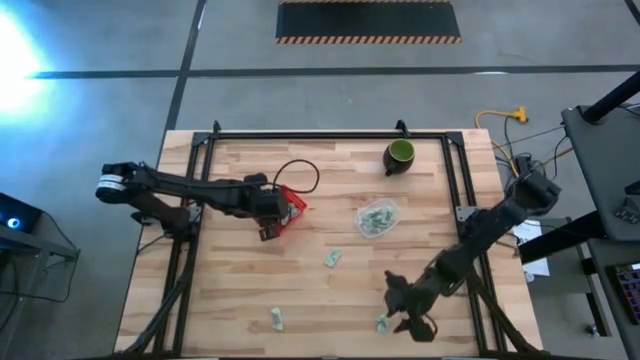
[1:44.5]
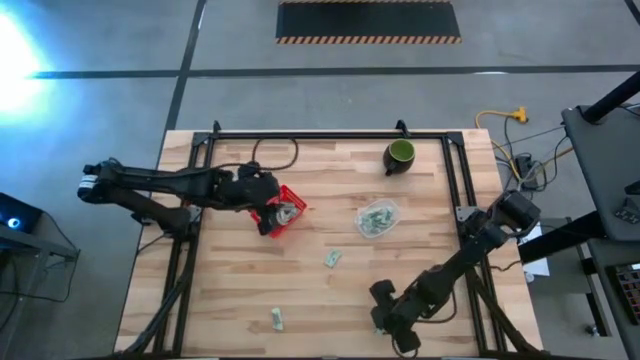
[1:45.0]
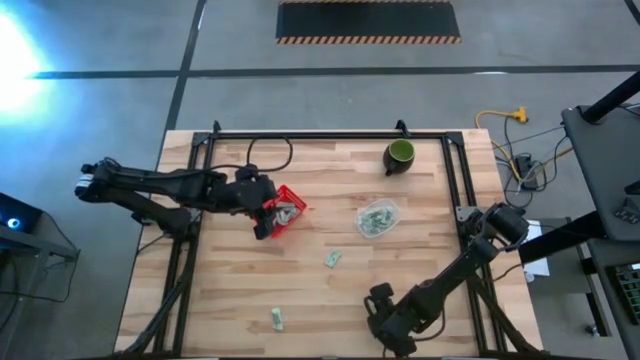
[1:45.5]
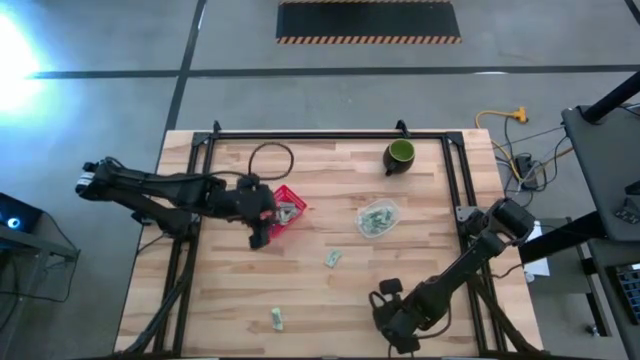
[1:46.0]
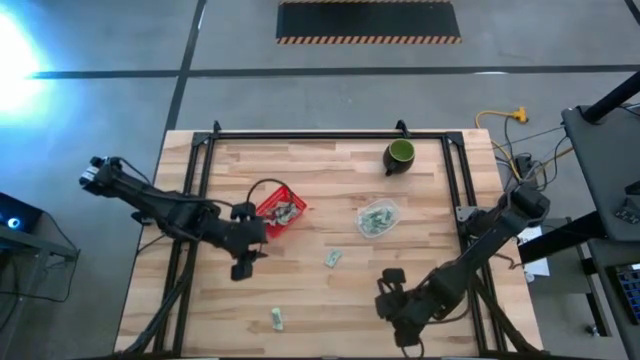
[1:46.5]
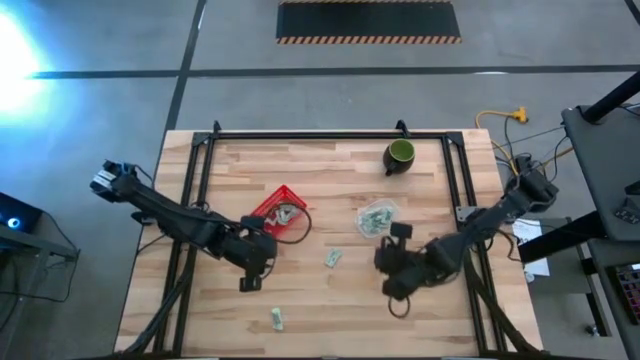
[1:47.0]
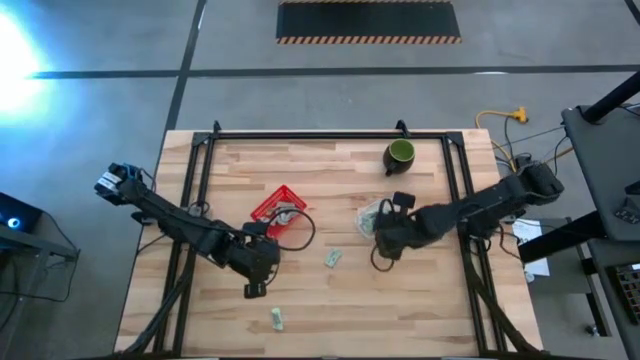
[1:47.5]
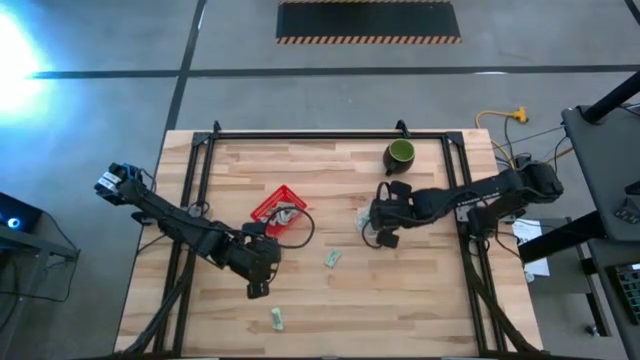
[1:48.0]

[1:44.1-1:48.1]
Task: Pick and place items into bin
Put the stevia packet into the transparent bin

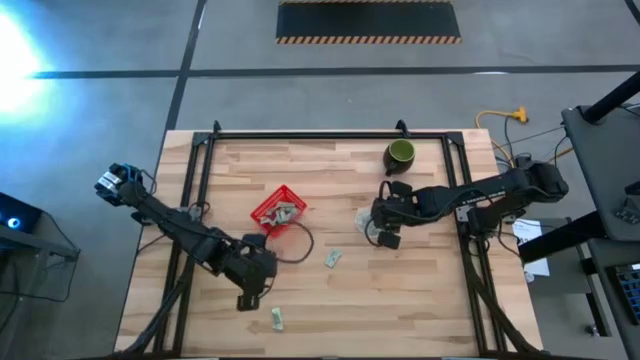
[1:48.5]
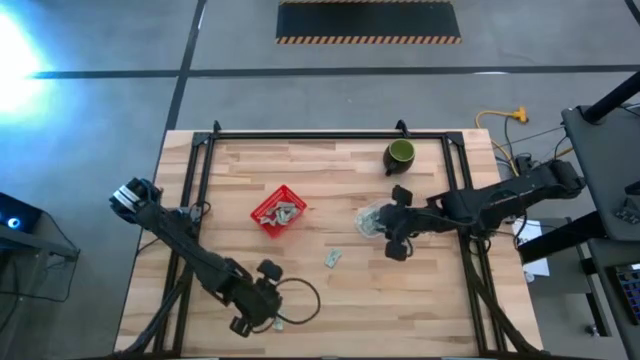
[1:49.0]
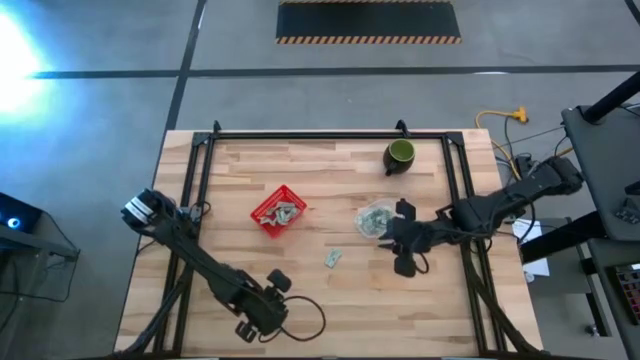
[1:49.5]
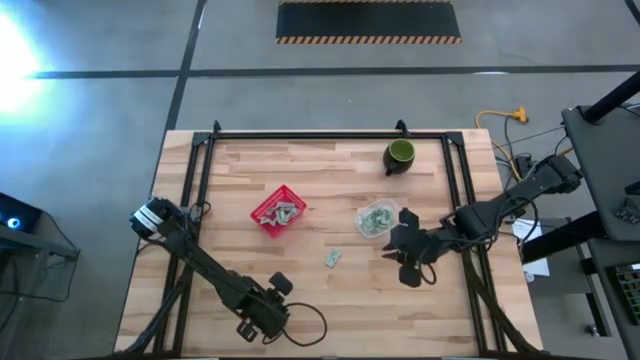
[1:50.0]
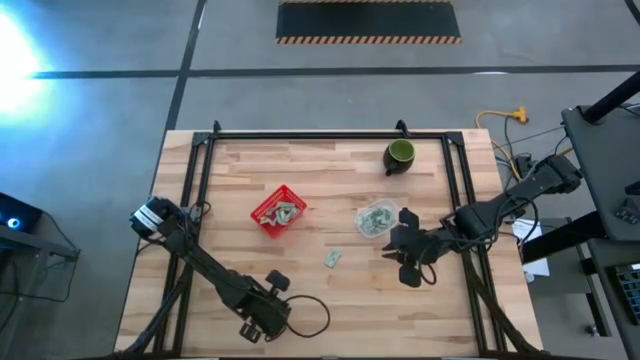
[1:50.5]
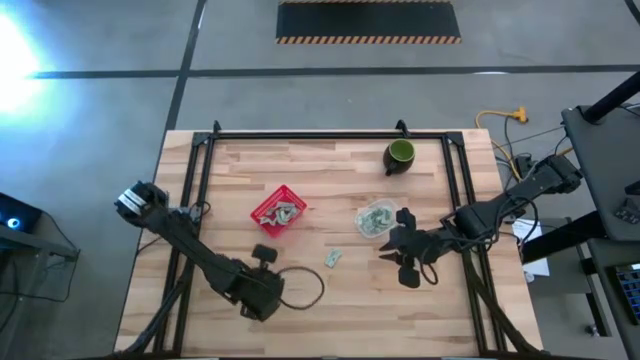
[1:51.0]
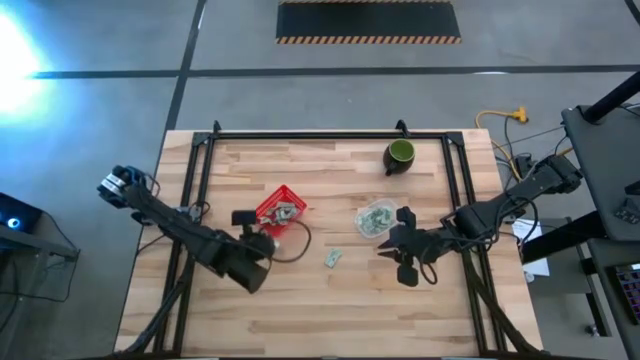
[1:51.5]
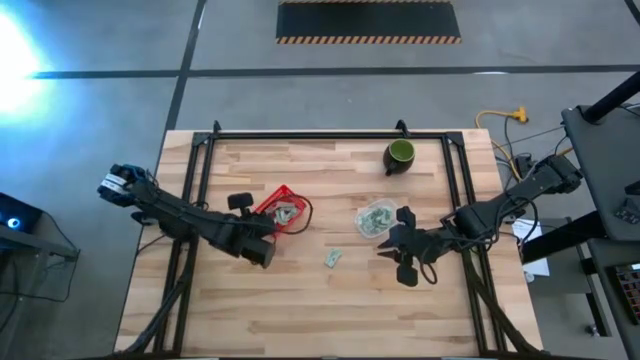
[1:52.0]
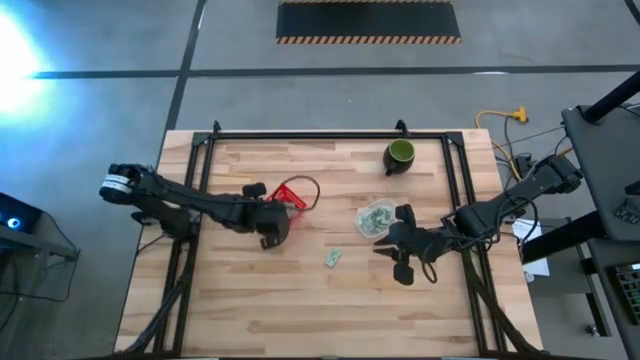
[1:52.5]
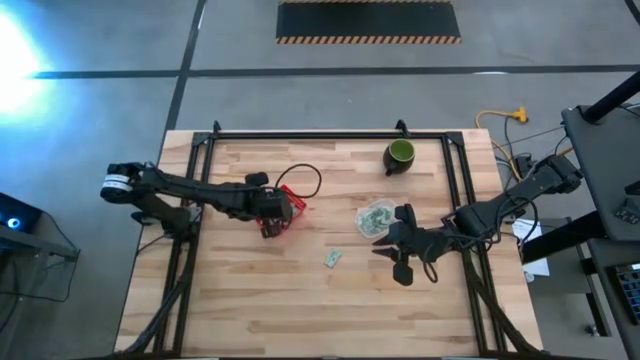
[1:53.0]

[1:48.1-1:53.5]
Put the stevia packet into the red bin

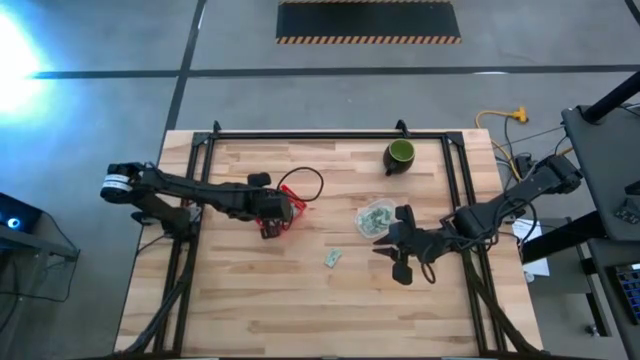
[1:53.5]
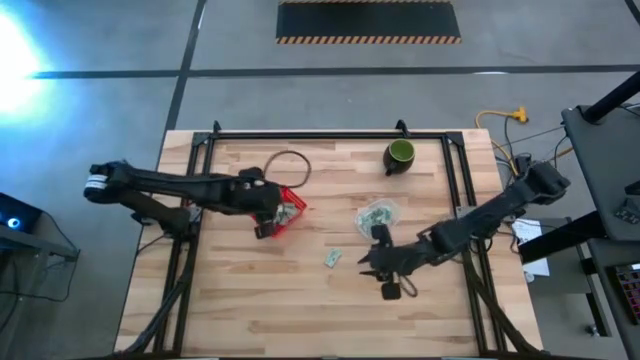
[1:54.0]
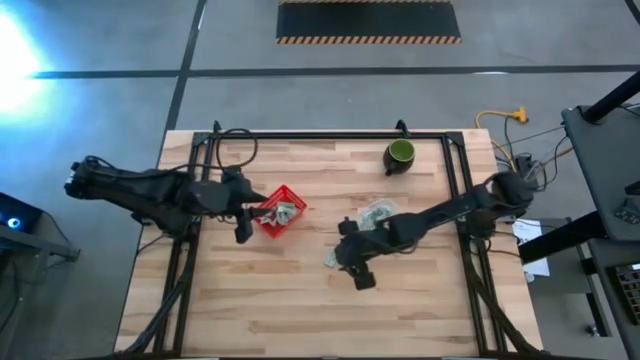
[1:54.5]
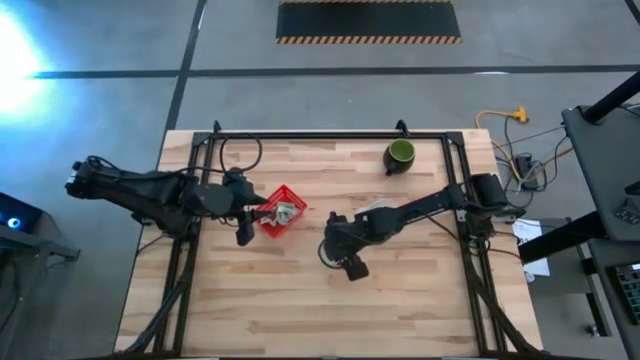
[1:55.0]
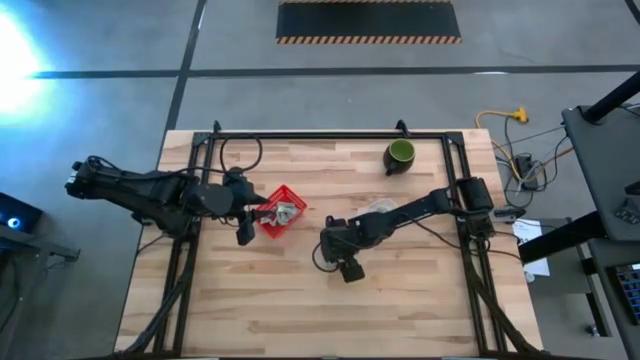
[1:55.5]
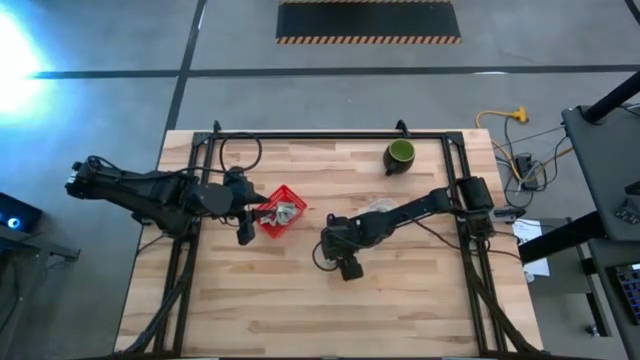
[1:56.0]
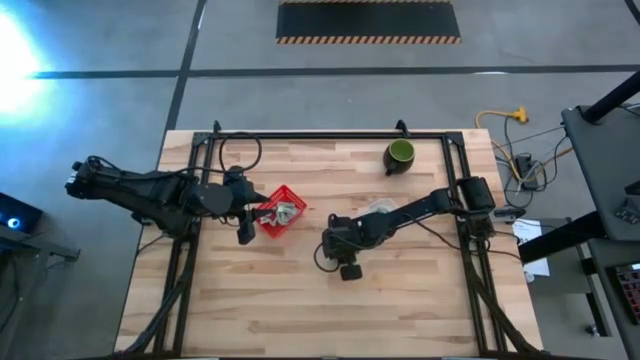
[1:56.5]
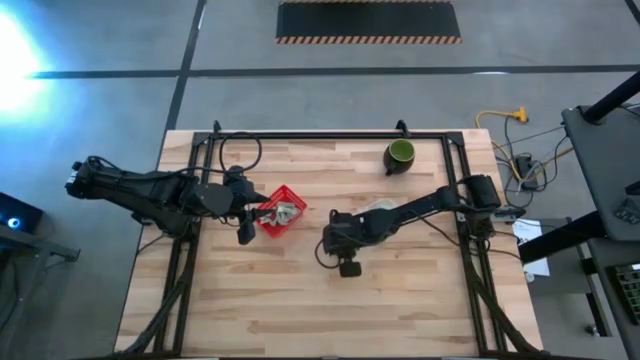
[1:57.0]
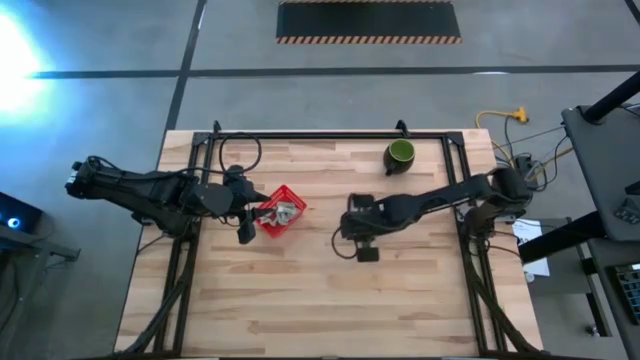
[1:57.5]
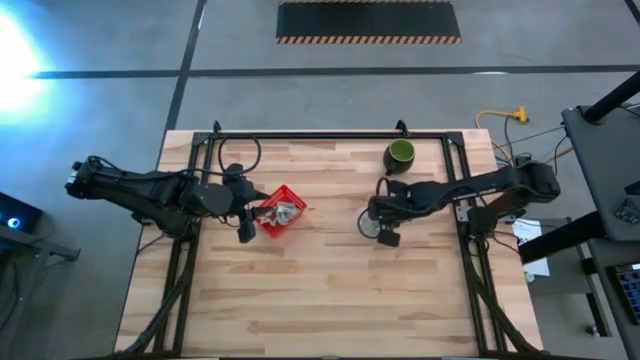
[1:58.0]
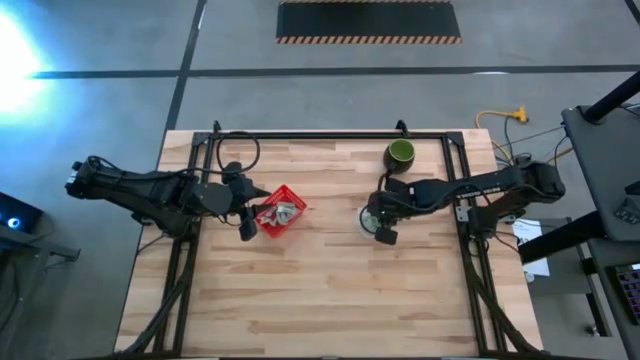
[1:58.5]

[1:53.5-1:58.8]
Put the stevia packet into the transparent bin

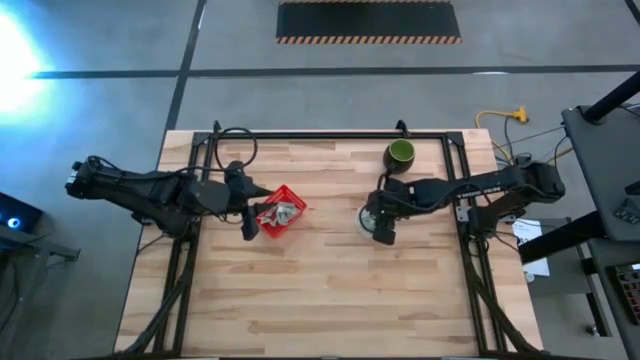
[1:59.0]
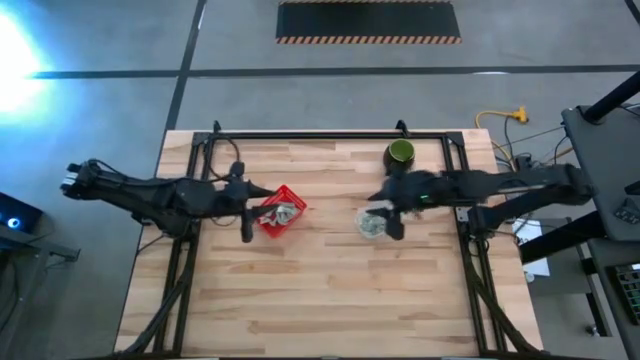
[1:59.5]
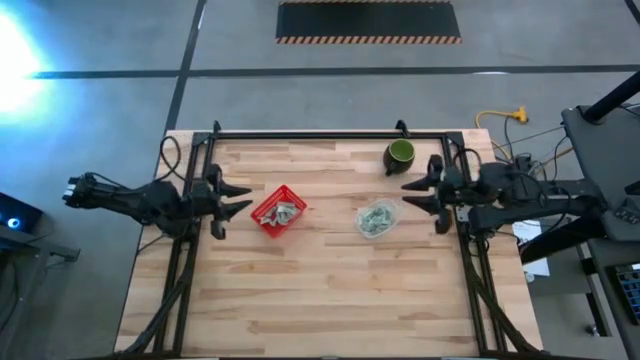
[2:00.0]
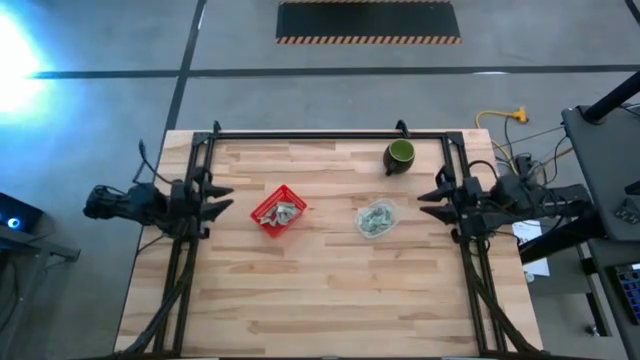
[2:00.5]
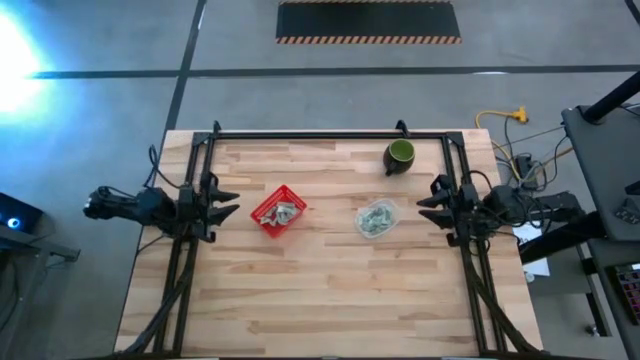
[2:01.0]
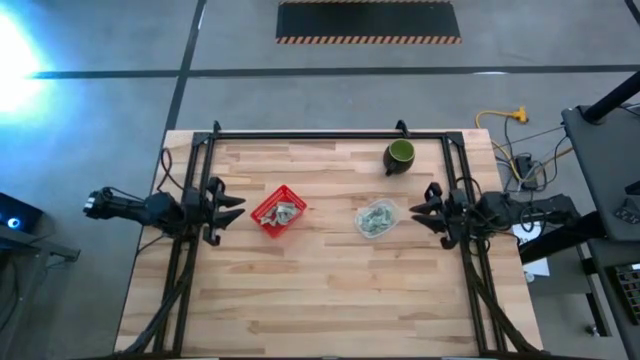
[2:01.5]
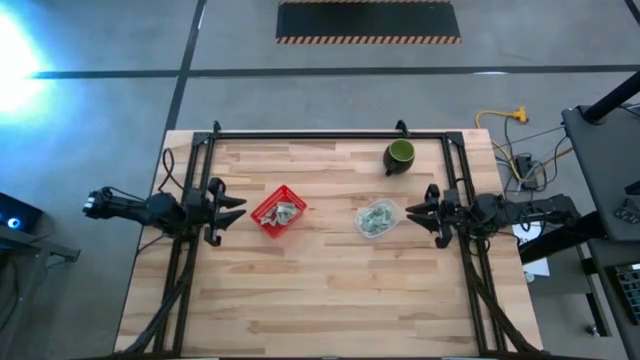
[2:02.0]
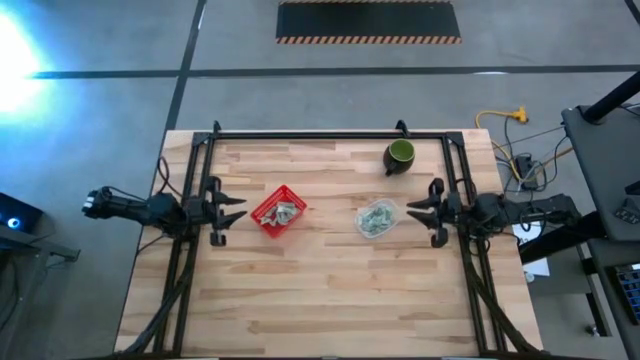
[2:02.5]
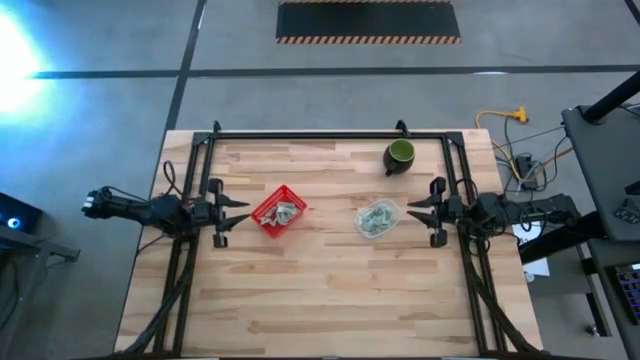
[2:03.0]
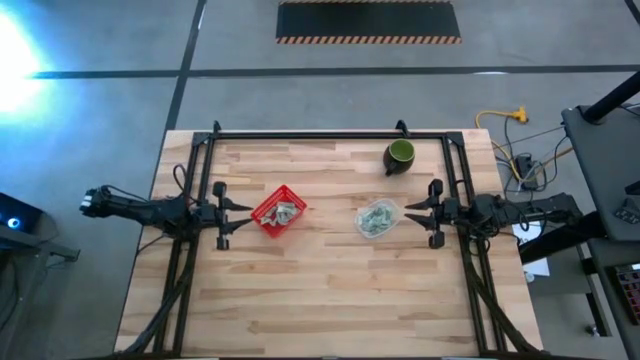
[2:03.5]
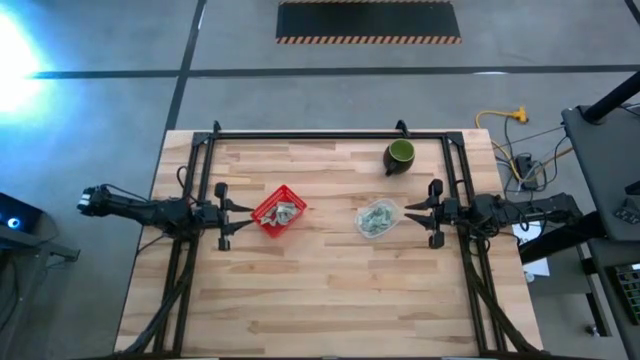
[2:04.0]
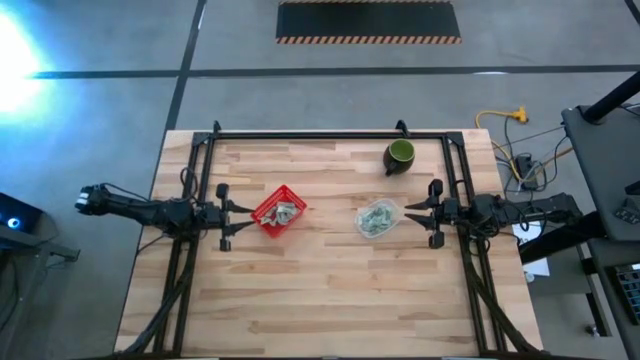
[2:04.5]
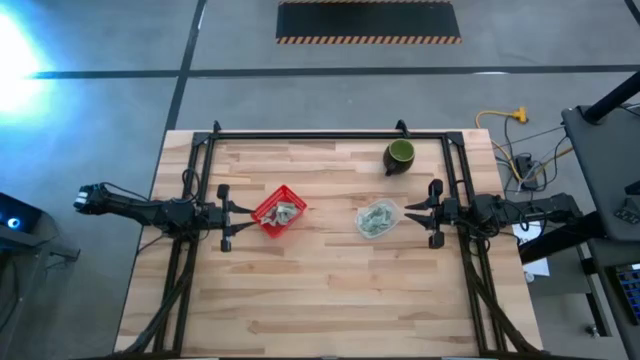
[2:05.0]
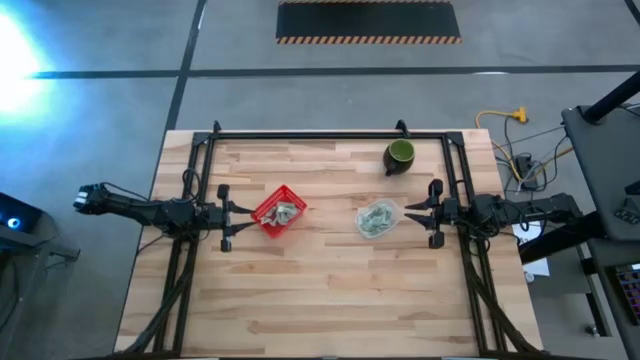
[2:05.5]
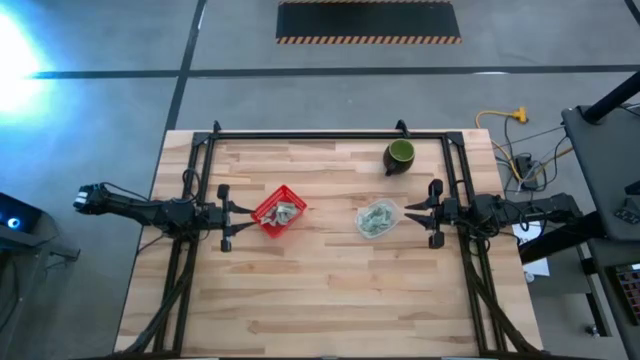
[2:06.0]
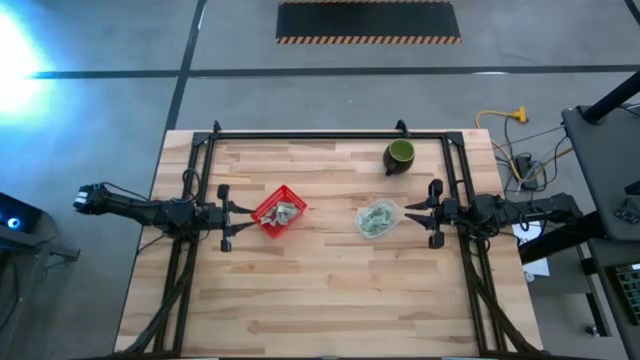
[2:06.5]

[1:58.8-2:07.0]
Return to Home Position
